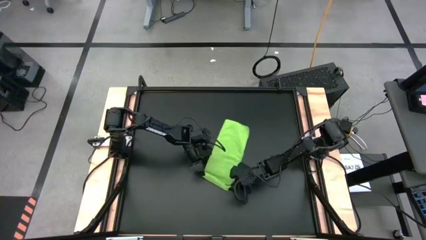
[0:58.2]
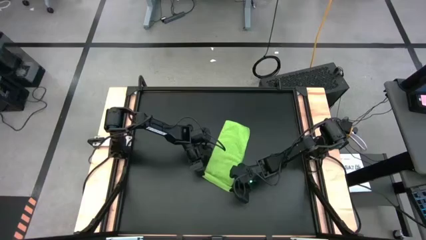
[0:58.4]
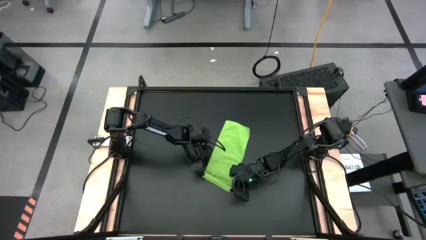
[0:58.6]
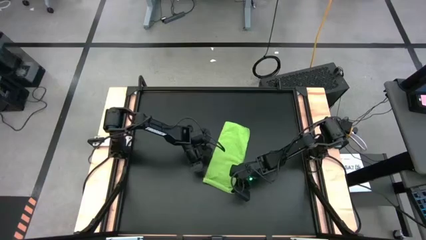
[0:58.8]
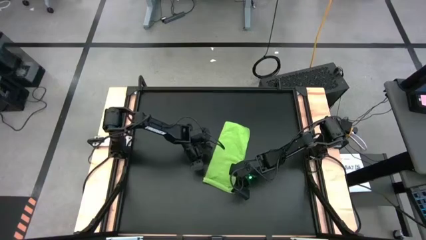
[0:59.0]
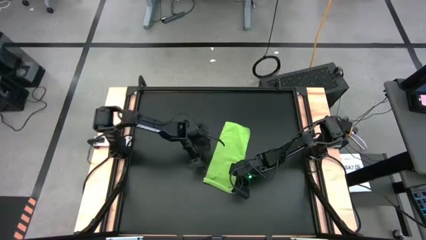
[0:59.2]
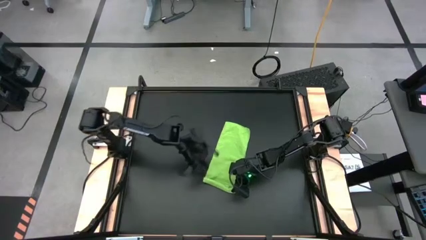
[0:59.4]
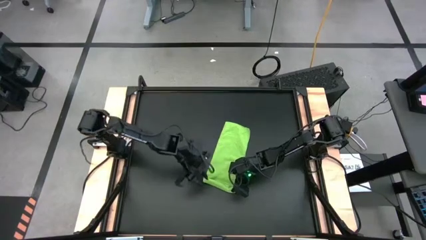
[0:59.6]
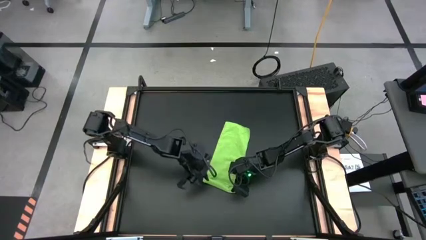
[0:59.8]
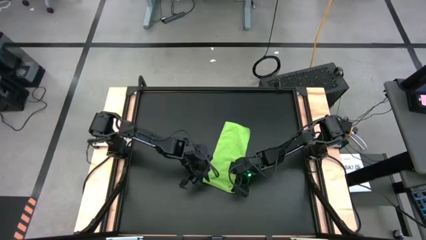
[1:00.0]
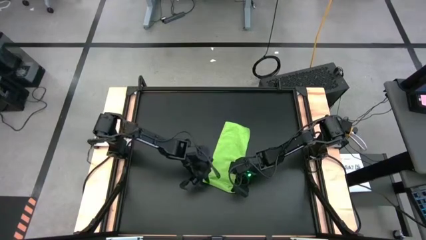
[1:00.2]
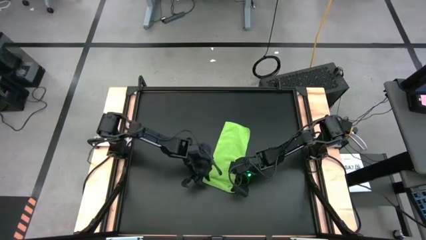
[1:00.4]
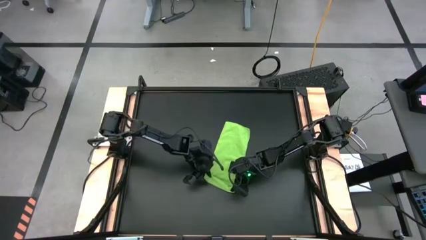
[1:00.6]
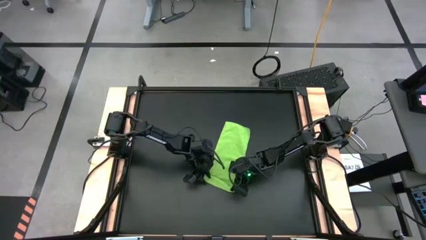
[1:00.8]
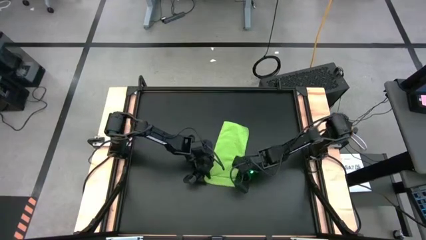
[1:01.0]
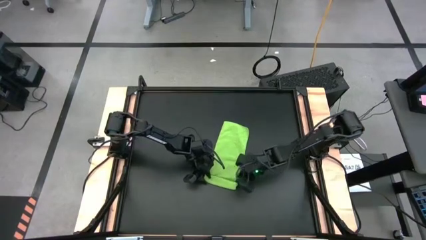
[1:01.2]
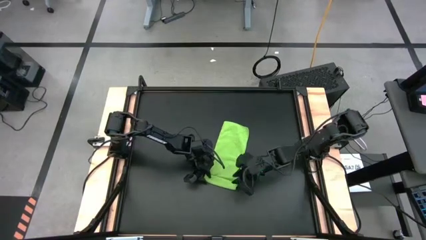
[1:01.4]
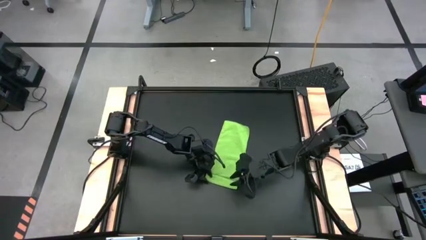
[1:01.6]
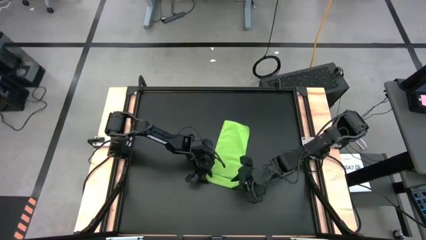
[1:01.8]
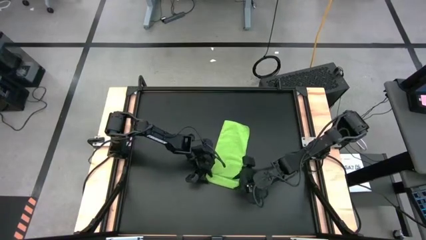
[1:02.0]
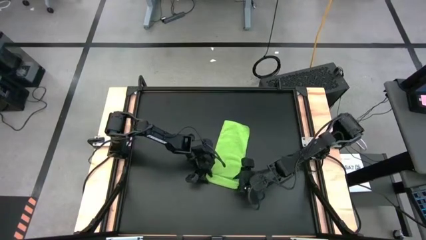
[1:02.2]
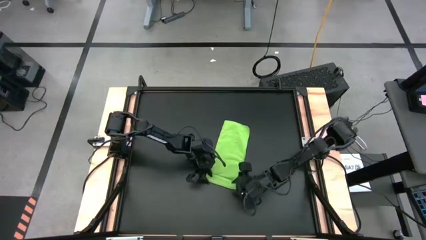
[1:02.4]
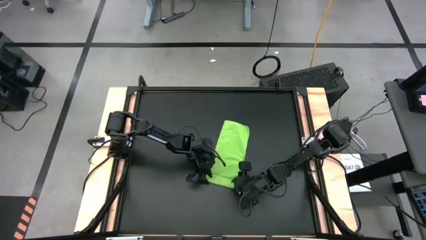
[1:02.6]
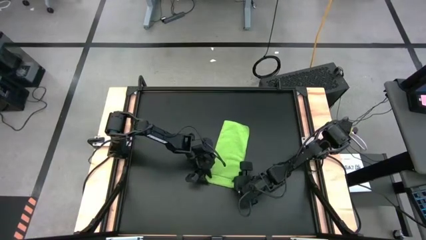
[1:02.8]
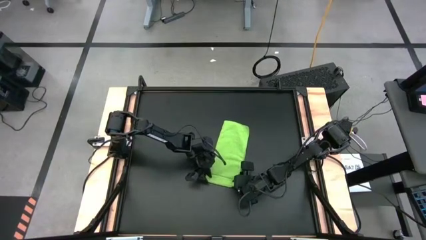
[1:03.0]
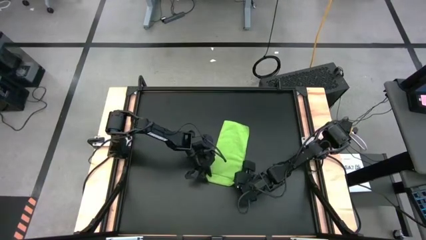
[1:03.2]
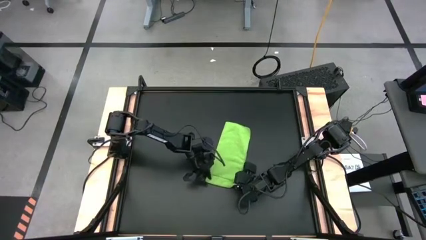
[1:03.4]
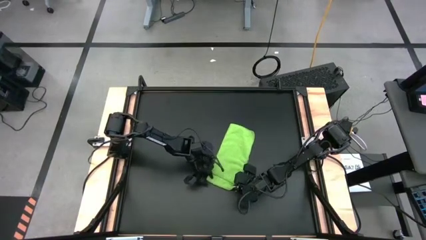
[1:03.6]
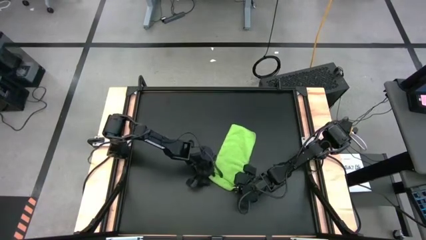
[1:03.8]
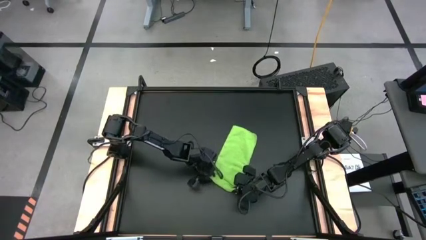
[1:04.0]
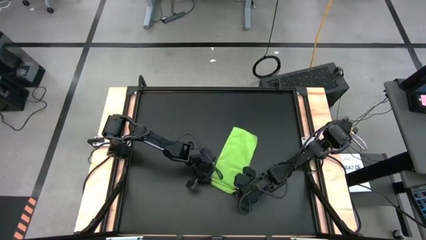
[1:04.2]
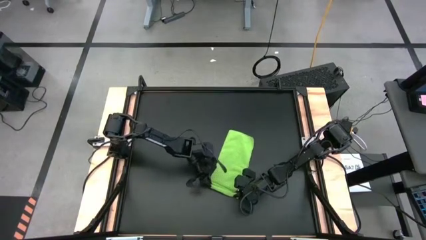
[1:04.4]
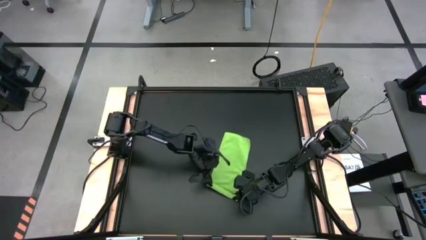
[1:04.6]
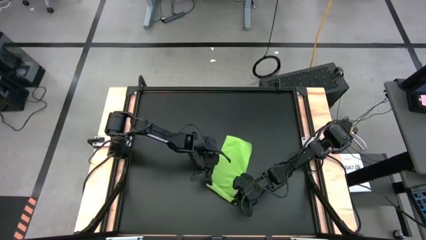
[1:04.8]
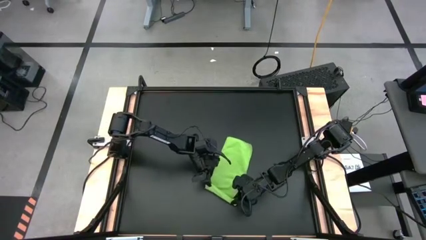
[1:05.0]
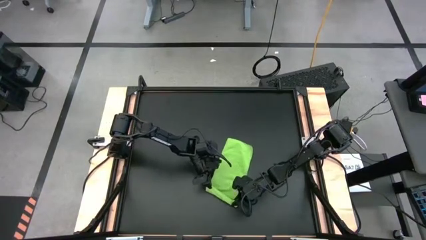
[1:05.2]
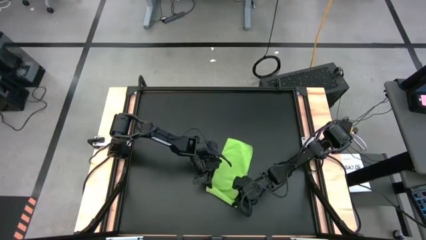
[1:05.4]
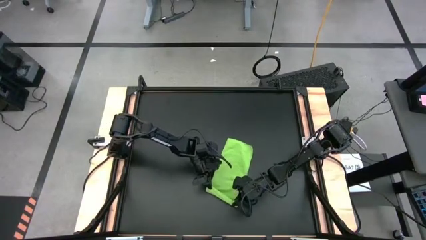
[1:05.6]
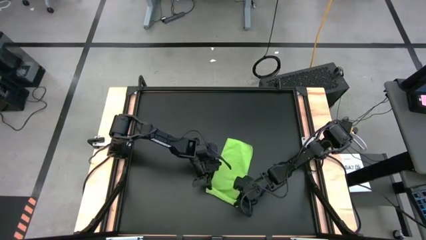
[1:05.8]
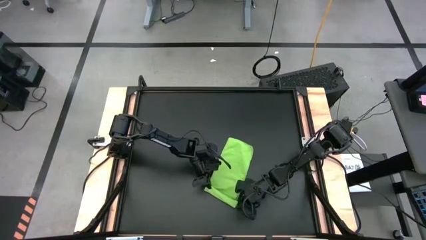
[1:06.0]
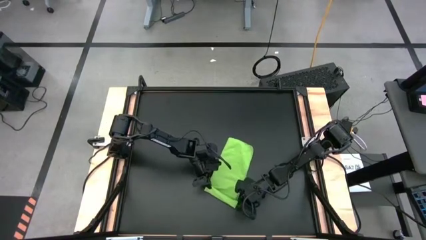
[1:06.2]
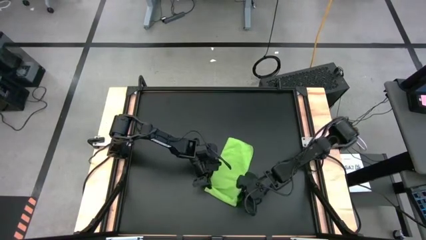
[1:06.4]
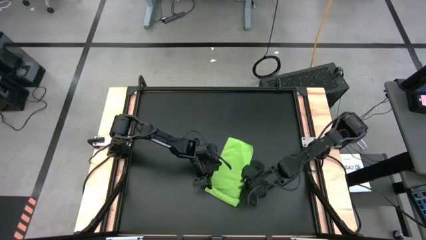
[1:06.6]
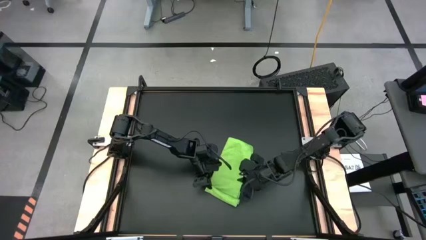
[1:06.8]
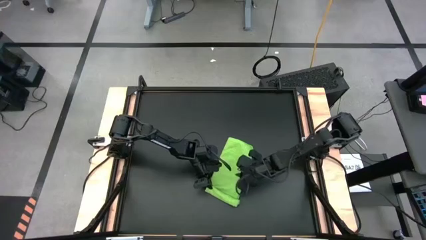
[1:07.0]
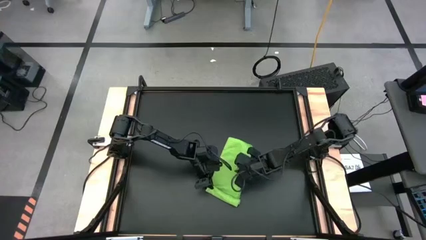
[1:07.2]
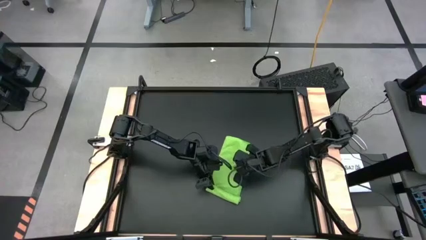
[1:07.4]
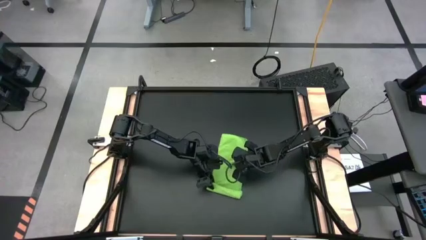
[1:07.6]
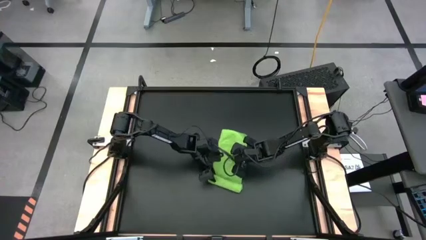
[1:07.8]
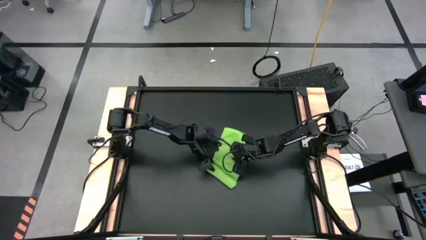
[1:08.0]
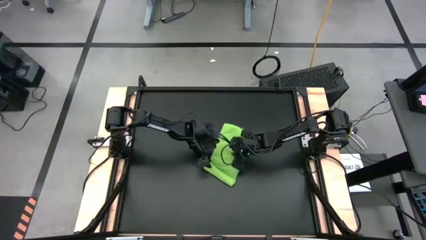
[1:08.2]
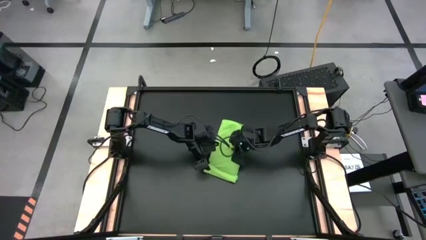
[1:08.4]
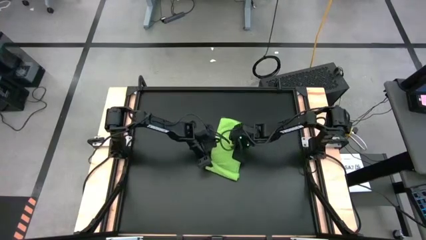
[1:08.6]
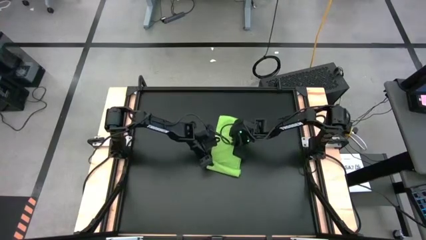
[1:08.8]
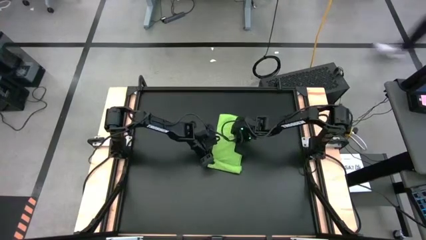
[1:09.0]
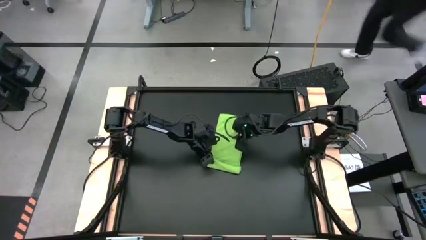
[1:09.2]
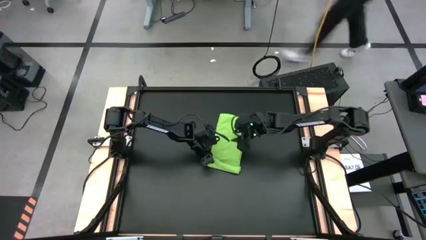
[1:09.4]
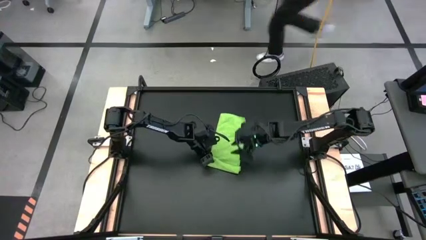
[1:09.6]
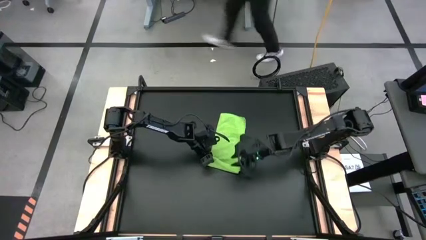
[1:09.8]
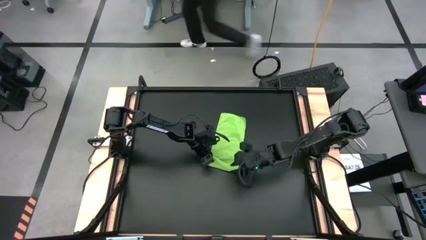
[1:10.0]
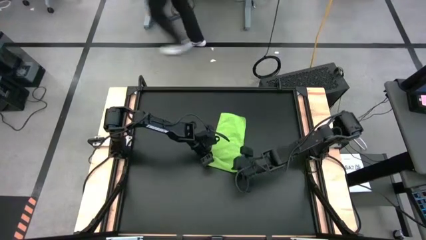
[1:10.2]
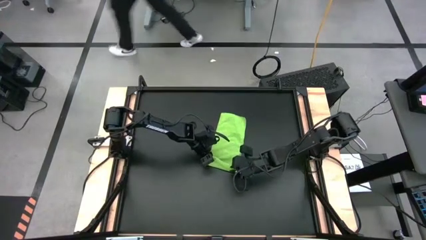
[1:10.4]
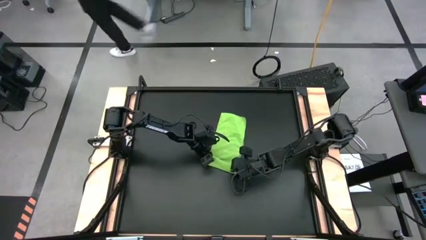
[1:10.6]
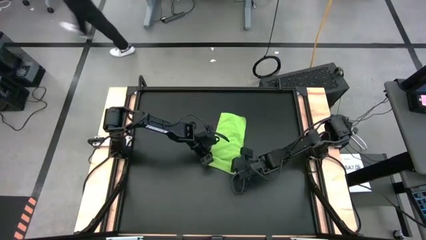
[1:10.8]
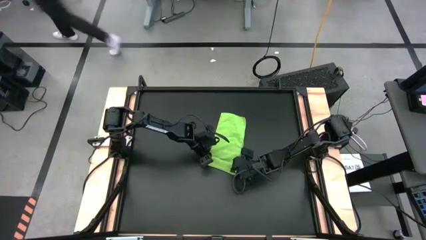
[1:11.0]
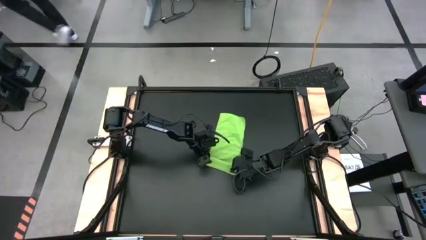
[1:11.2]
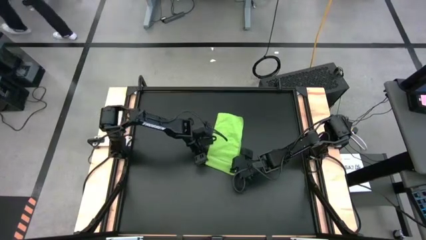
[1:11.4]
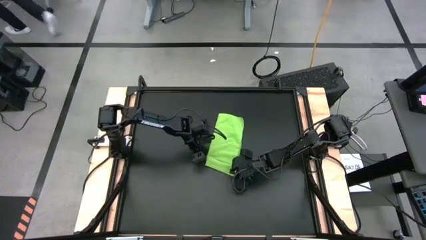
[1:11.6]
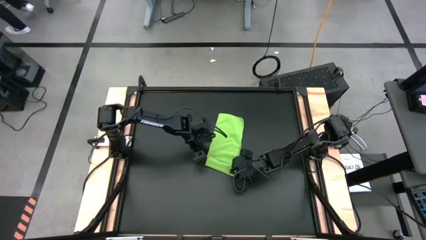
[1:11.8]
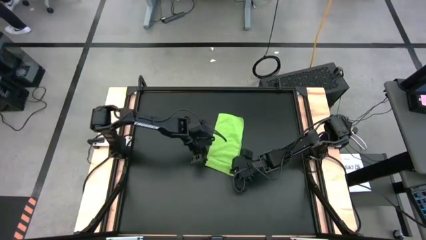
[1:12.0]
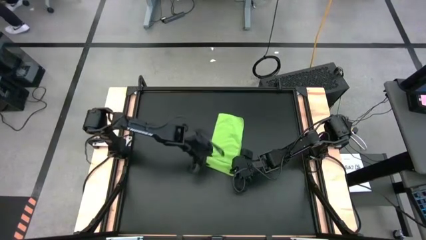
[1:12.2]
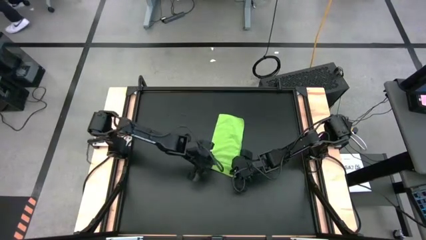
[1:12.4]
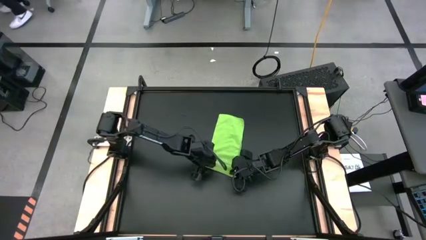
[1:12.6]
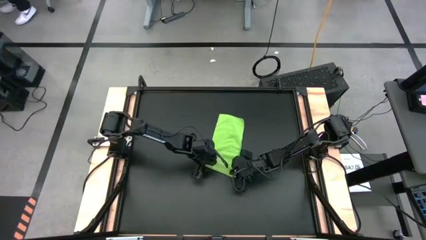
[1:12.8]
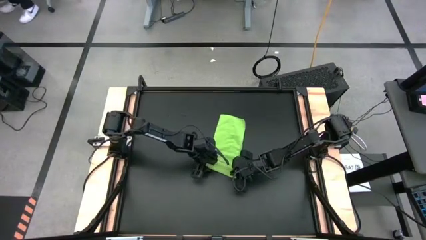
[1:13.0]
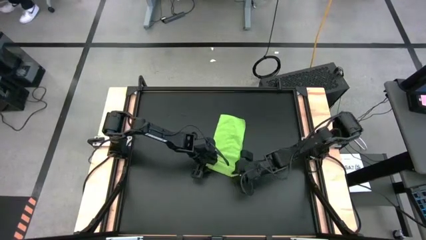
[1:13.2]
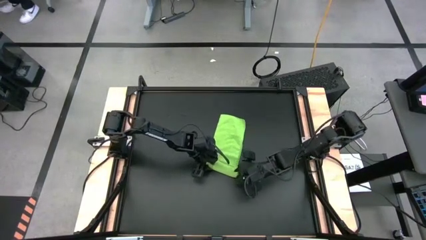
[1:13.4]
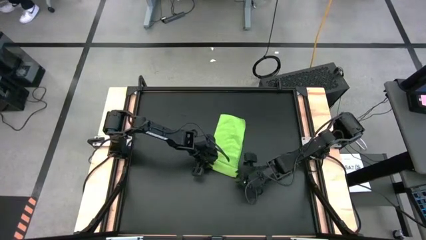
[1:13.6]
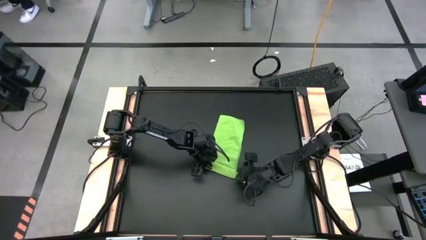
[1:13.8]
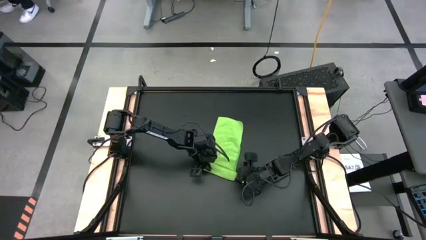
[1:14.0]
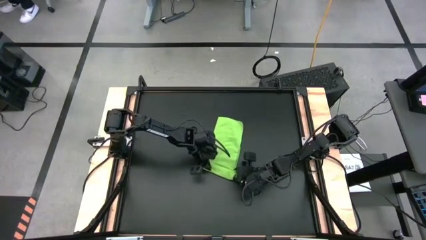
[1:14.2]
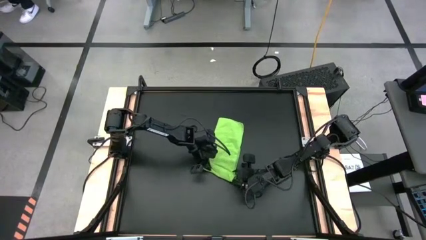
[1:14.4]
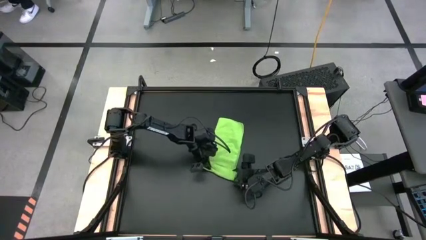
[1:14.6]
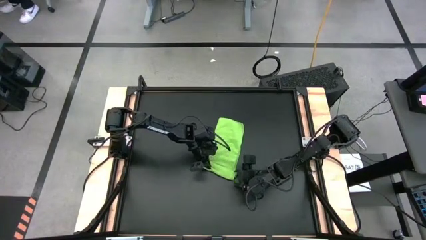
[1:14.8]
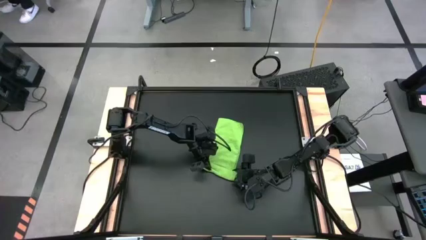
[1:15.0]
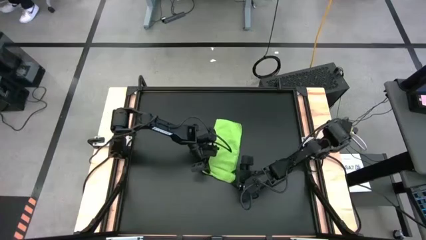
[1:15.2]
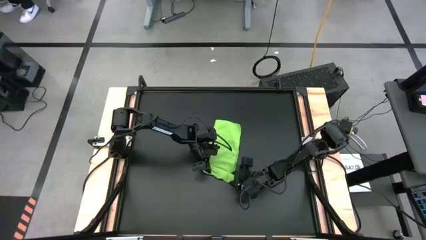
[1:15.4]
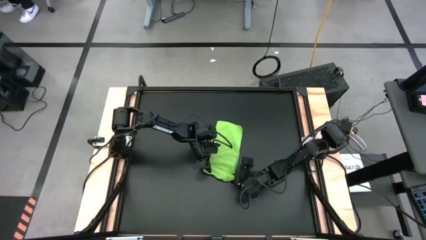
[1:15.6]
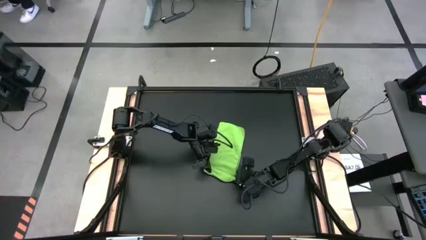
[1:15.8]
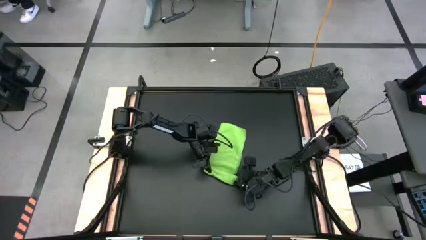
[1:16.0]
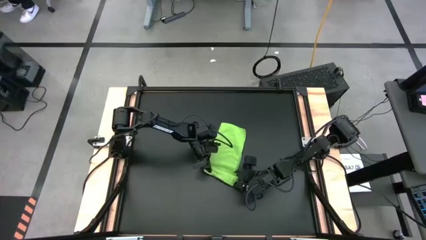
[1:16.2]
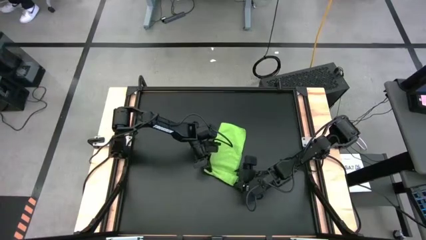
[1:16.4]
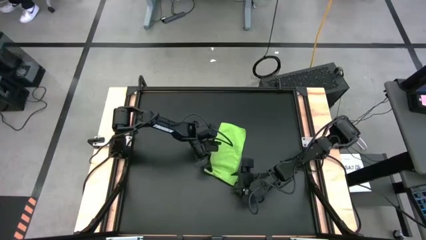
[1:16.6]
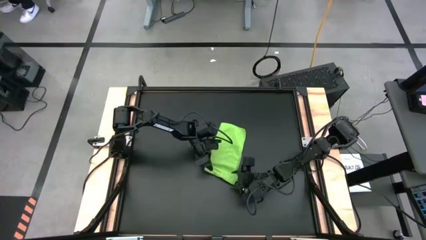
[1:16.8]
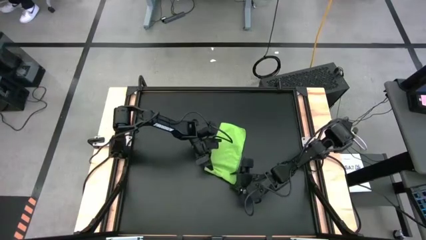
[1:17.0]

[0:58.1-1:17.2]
Task: Roll towel into tight, uniform cylinder
Roll the green towel
